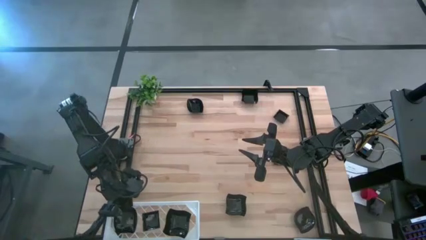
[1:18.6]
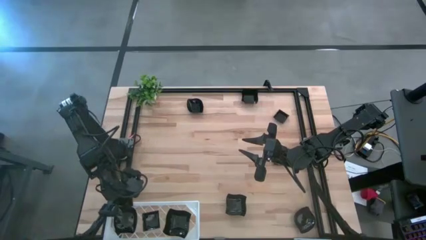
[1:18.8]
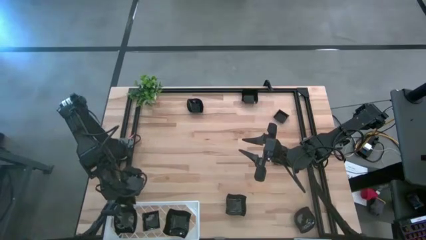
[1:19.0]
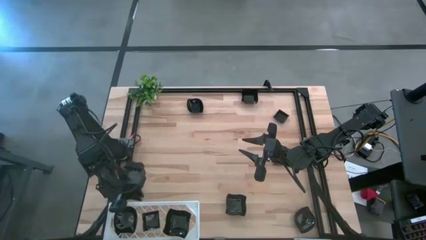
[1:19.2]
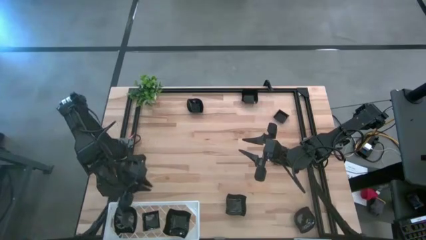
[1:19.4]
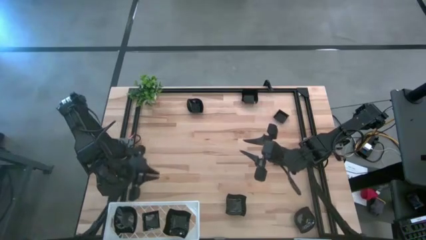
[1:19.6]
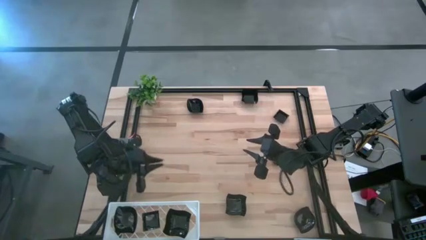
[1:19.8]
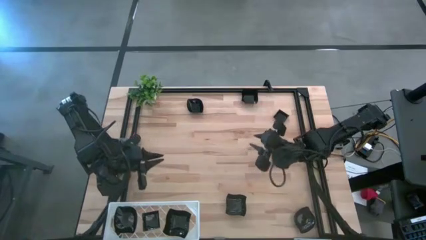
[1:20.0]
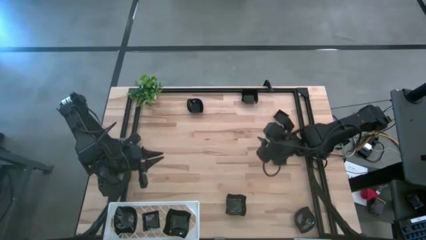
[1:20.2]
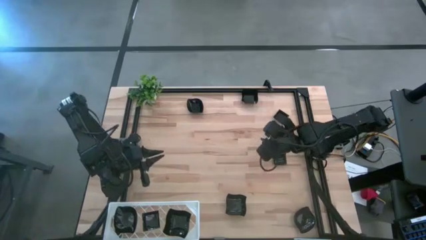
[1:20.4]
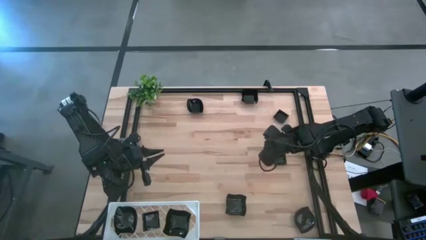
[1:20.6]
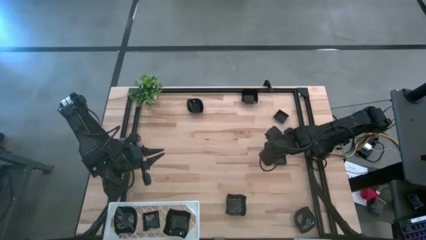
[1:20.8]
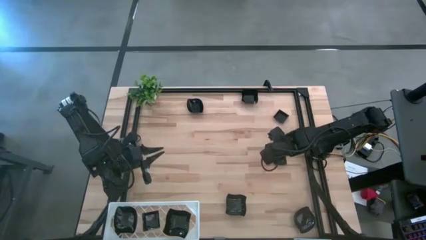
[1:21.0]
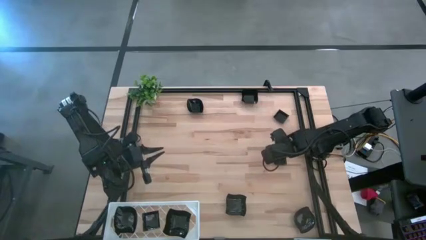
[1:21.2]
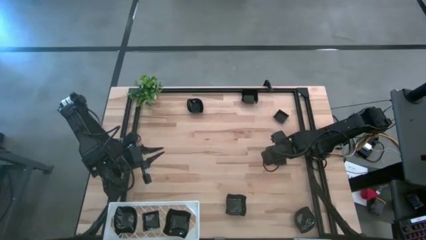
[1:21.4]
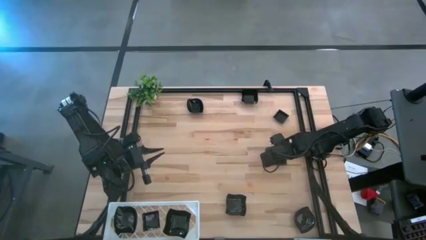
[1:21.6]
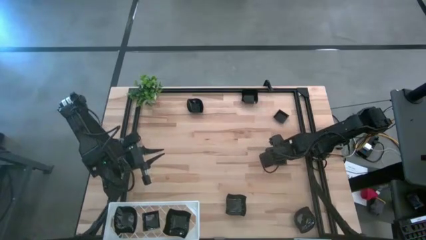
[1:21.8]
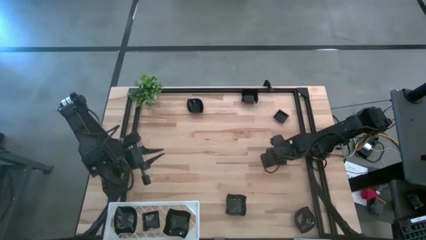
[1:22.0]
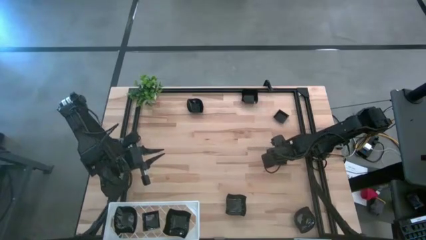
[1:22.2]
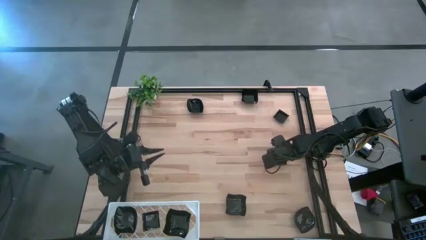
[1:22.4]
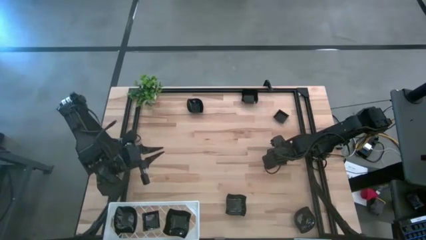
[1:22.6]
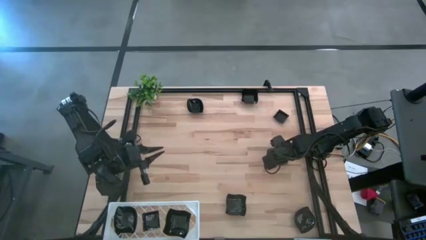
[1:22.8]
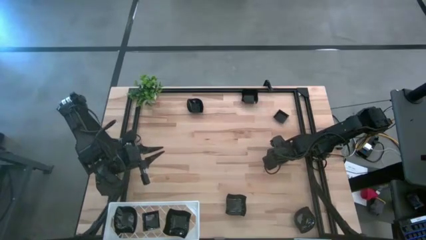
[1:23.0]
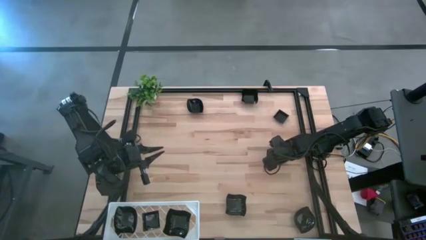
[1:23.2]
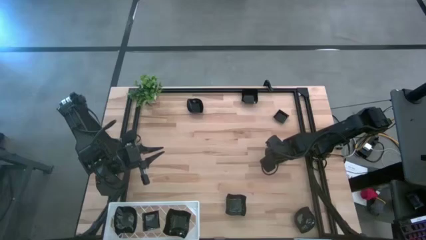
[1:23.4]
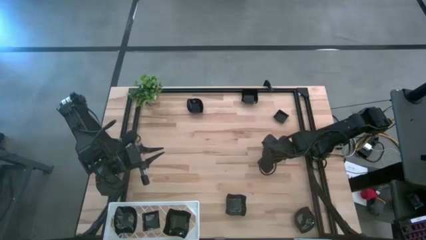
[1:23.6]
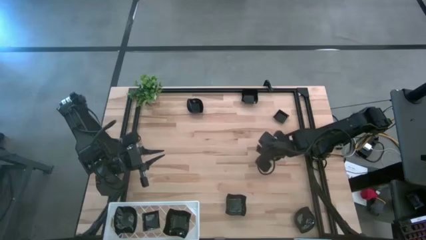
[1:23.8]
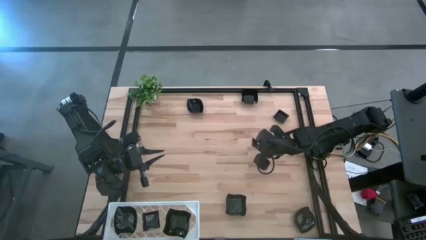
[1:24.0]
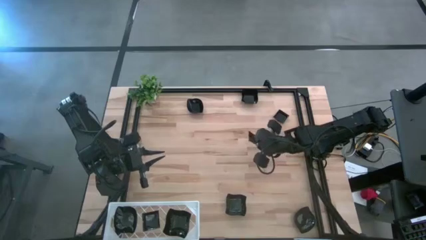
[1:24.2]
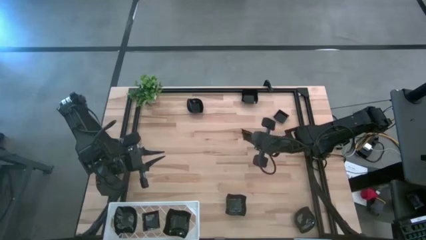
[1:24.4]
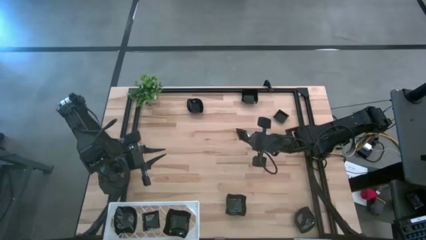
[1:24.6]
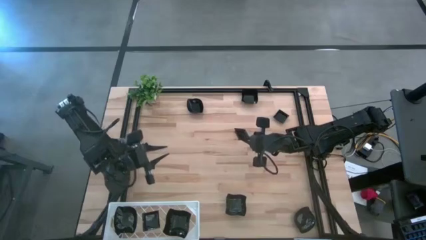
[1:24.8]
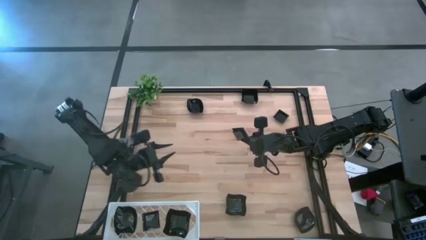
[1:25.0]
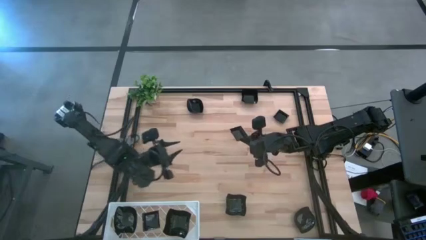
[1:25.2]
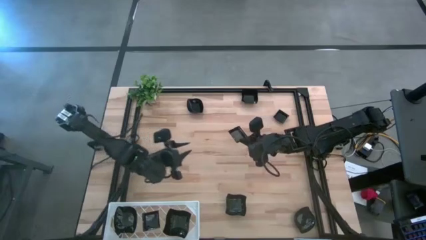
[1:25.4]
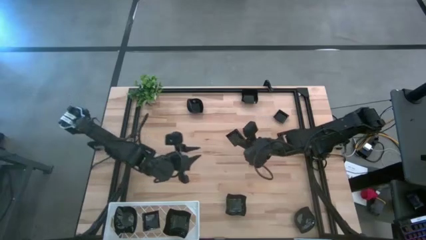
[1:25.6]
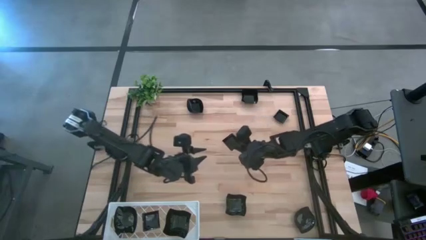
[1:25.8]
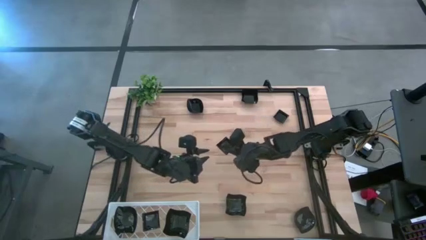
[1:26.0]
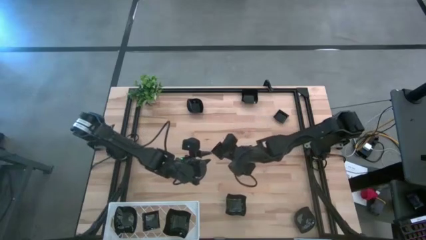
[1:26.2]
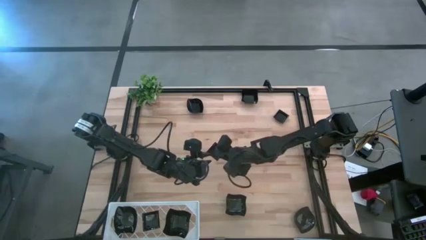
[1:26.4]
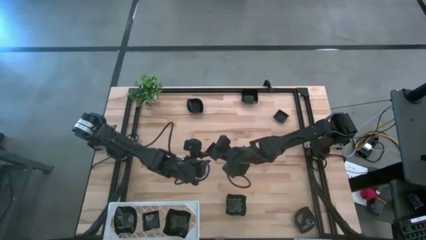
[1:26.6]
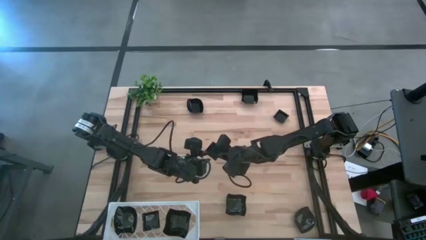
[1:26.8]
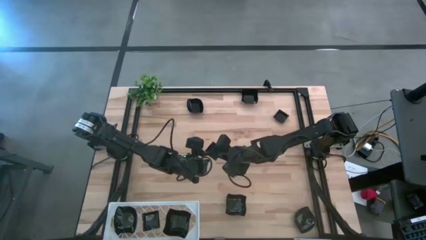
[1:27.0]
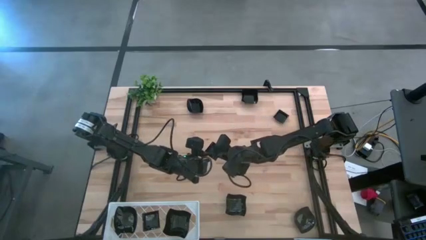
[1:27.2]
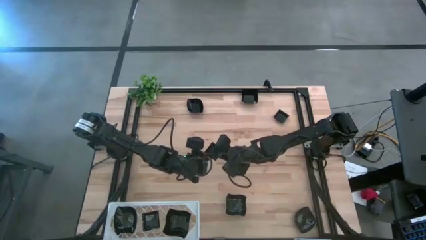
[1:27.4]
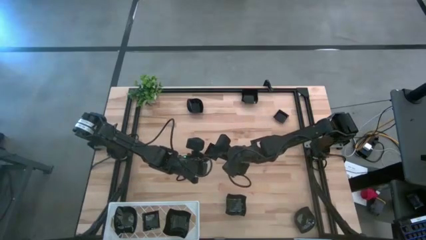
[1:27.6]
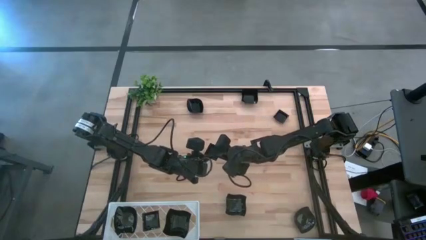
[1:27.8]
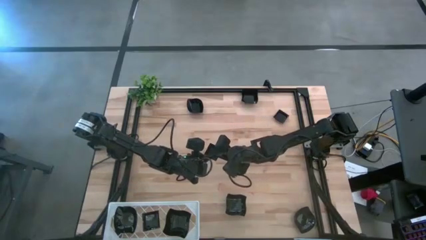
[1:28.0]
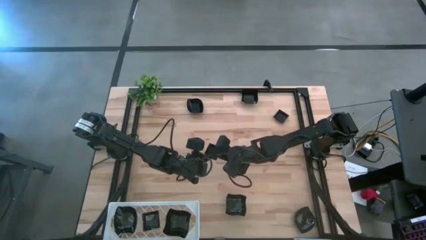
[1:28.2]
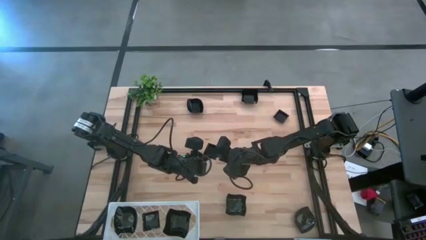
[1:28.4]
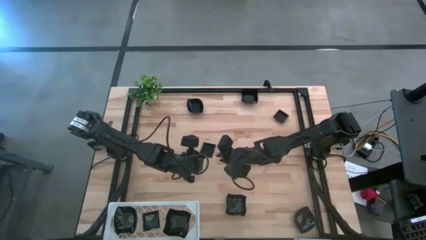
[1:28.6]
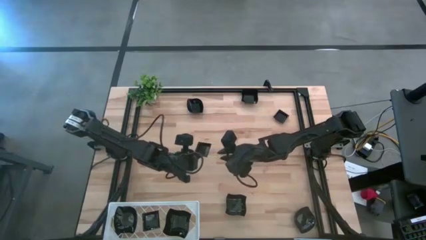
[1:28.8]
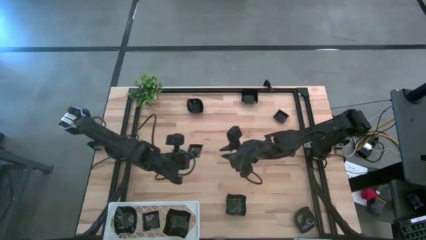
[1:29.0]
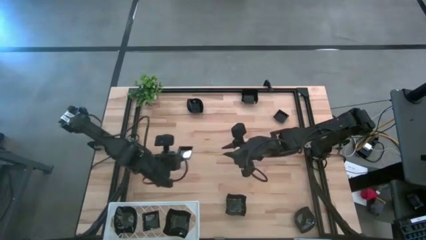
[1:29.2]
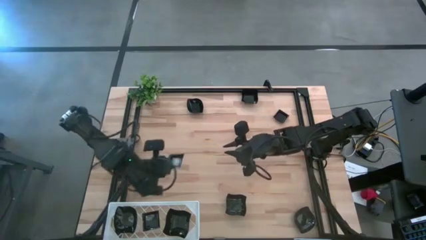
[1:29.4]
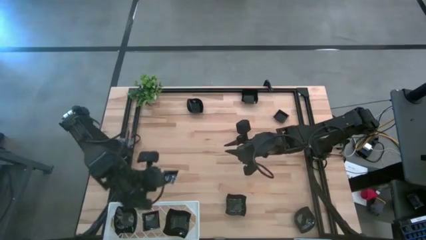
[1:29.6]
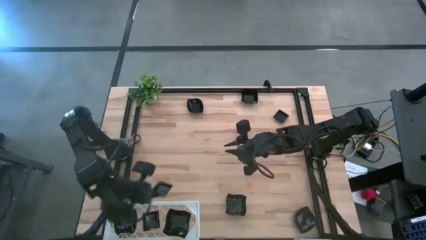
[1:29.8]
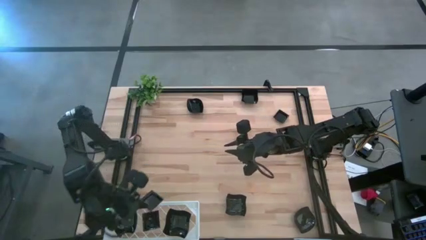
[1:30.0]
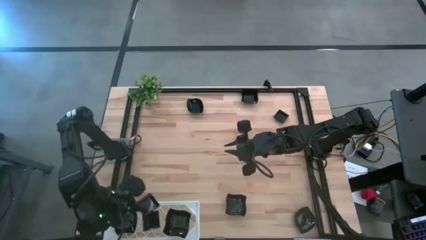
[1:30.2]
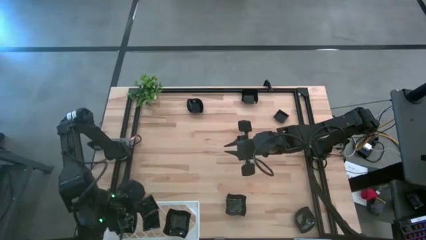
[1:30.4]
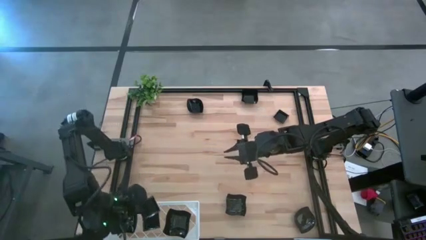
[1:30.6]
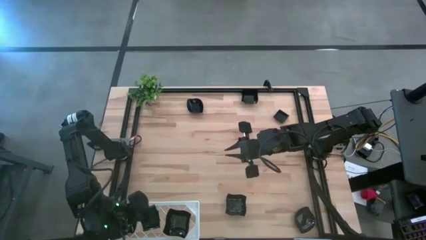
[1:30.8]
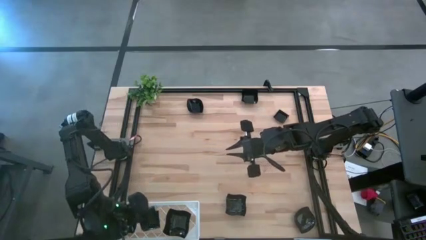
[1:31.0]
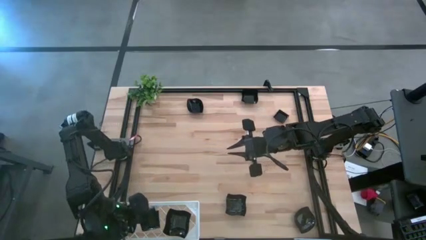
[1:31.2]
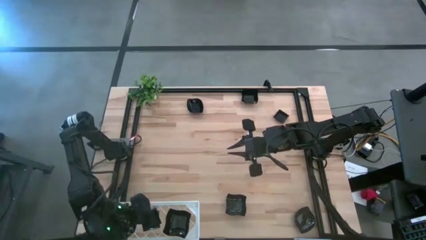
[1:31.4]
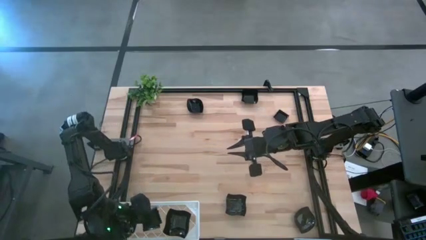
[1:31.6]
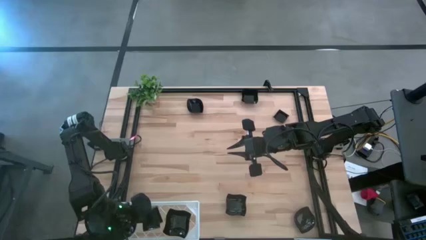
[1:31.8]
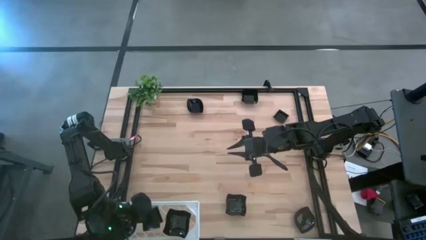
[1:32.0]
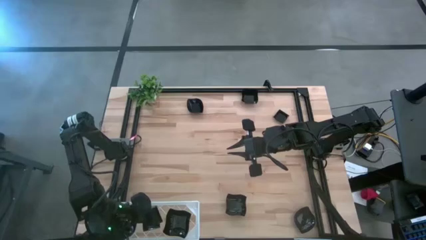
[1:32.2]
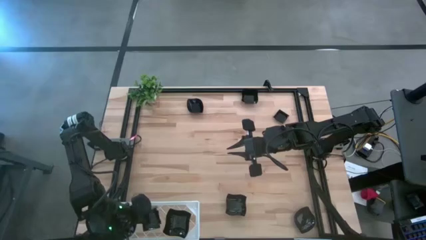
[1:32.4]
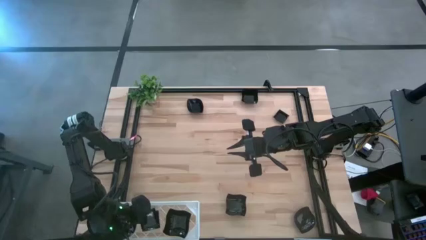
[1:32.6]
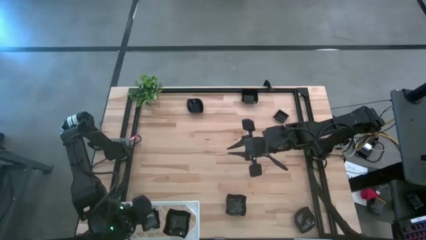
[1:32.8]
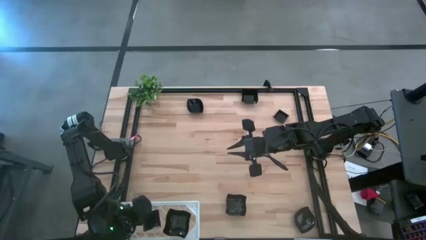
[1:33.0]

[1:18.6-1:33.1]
Task: Pick & Place Mini shaped plates
Stack the black square plate on top of the other black square plates on the shelf
